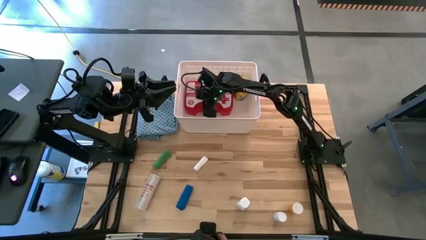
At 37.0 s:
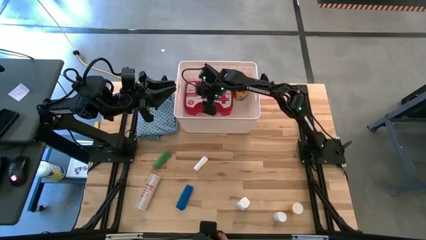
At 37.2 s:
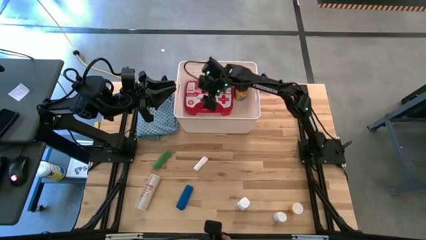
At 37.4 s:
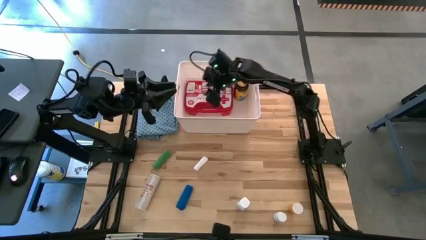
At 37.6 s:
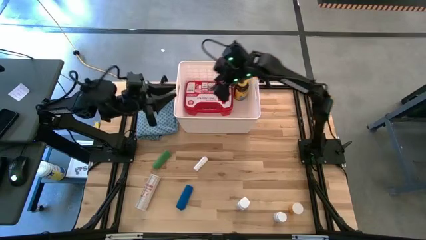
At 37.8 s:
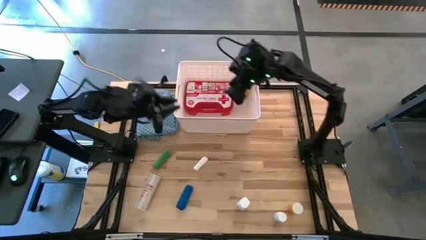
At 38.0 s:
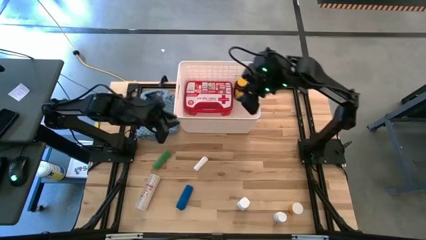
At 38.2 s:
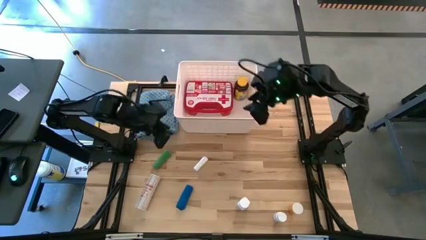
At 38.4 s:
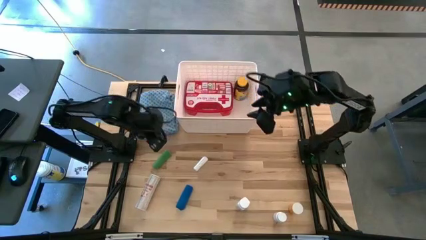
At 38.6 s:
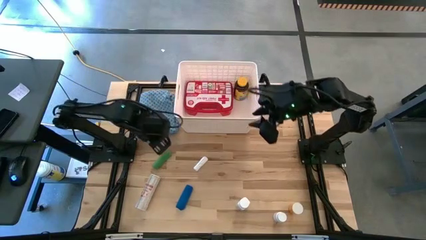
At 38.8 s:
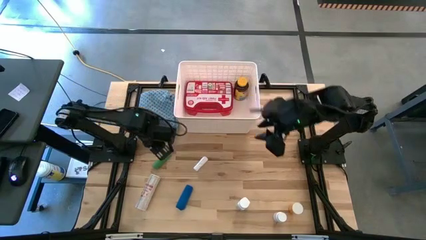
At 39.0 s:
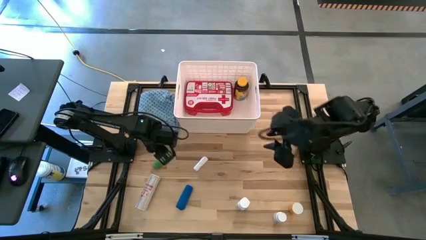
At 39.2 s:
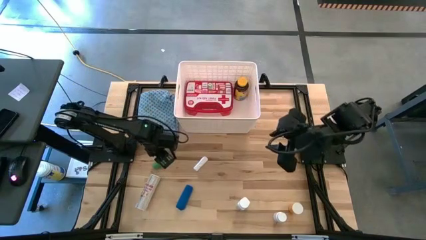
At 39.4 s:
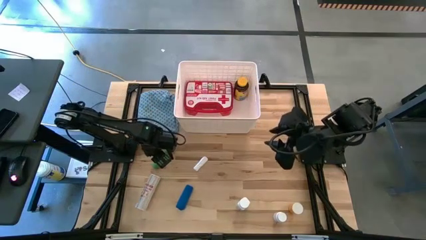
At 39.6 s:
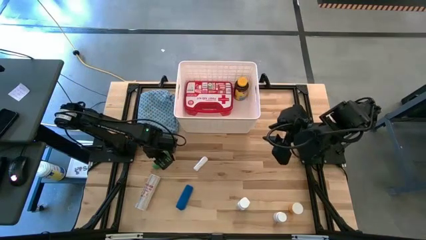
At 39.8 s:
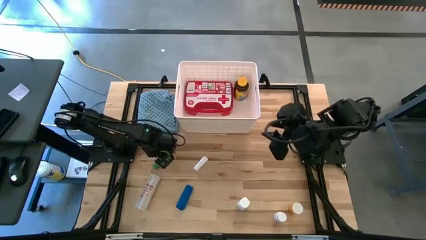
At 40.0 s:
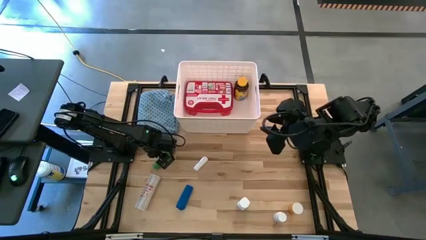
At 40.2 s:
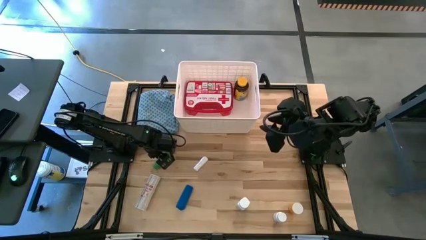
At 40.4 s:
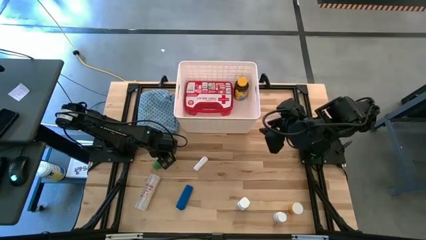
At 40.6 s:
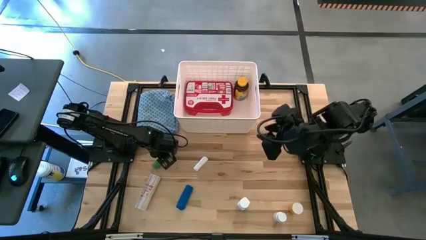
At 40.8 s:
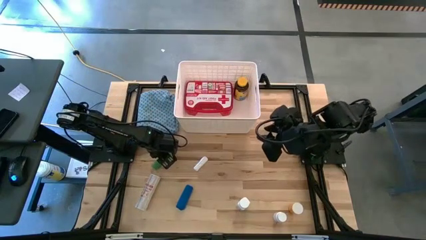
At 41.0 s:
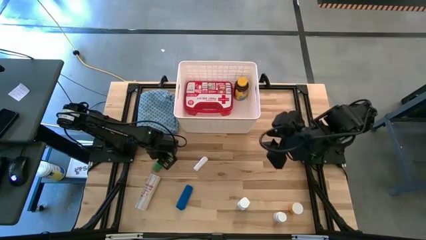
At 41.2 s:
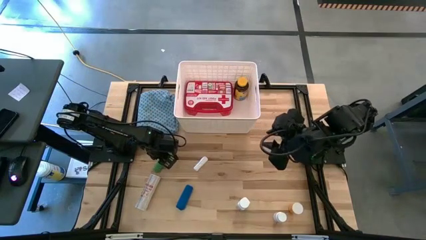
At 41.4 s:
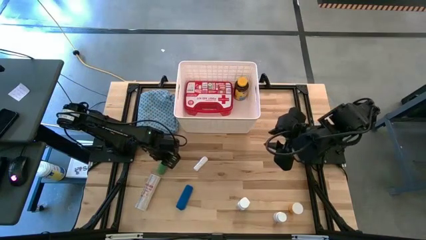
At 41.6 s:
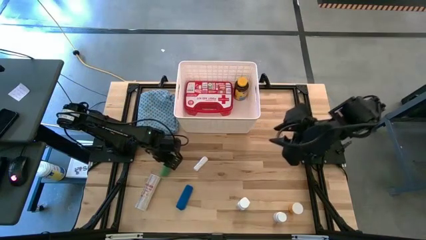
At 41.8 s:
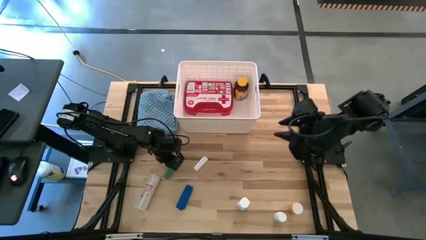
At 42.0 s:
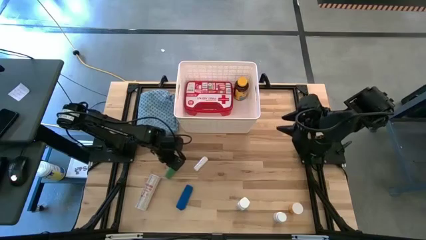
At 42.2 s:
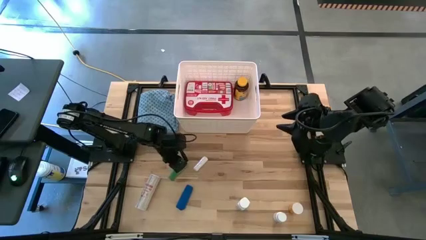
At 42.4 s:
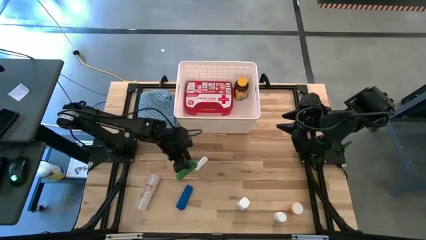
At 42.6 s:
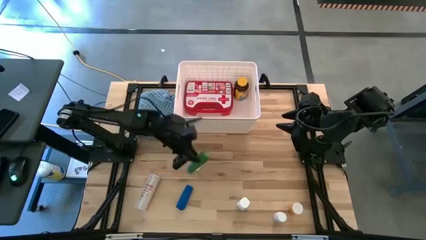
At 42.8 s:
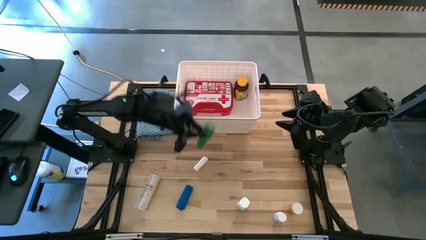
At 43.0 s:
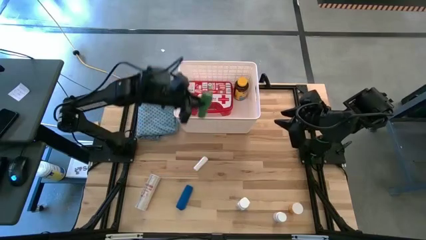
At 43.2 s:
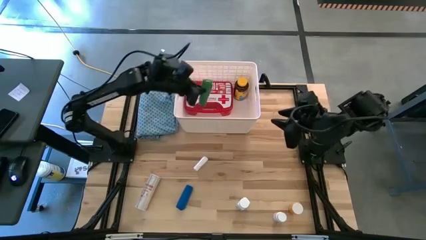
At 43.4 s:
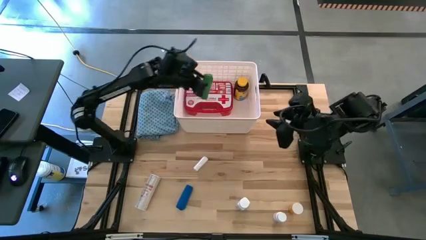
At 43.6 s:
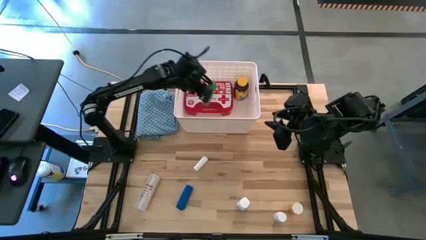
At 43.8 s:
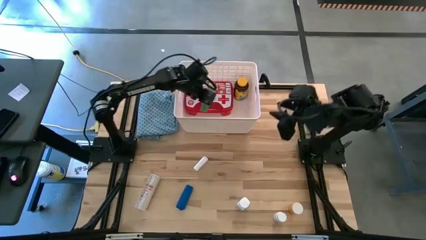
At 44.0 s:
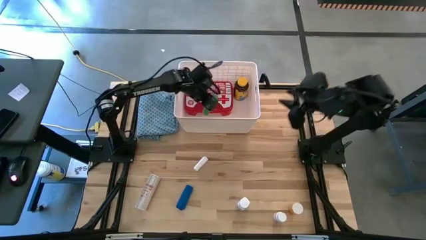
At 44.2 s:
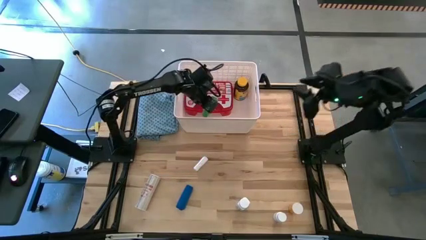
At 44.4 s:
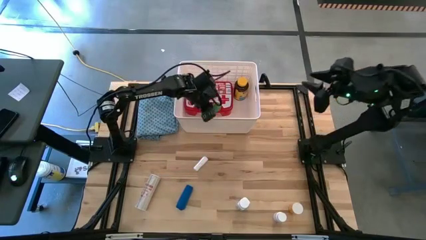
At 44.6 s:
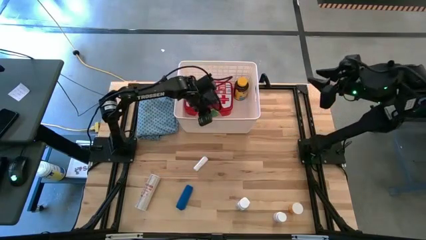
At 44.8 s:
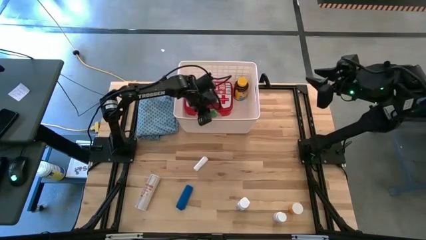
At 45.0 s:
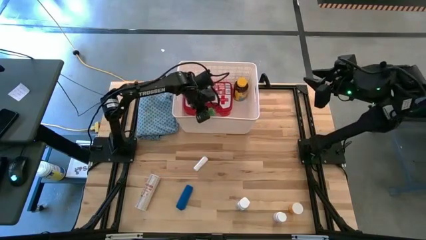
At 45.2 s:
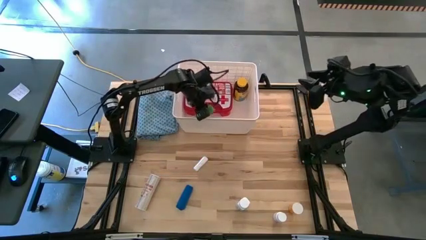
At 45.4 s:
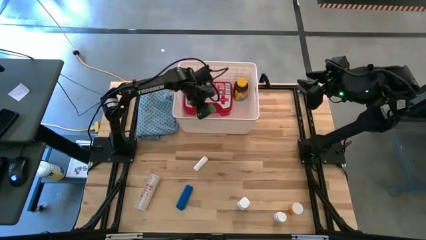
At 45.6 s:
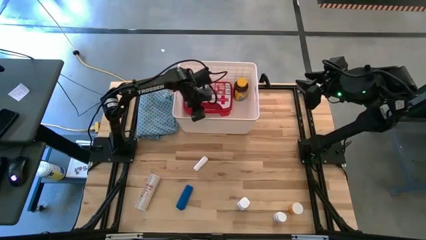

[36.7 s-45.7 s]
Task: Pick & place medical supplies in basket/bin
Put the green bandage into the white bin

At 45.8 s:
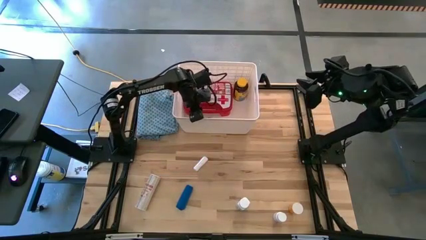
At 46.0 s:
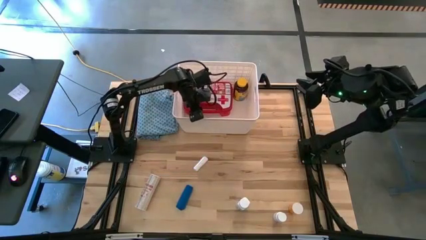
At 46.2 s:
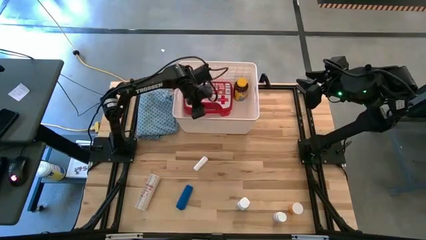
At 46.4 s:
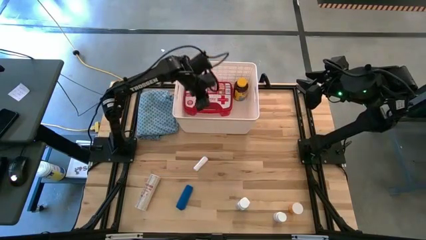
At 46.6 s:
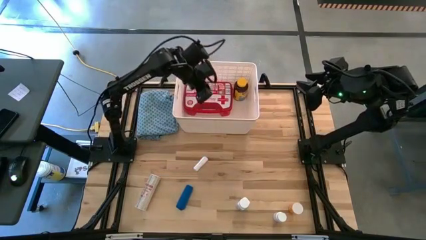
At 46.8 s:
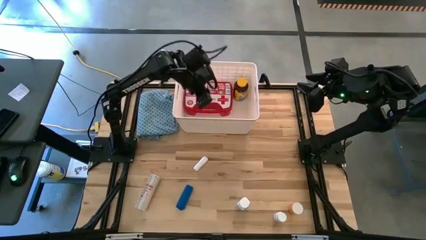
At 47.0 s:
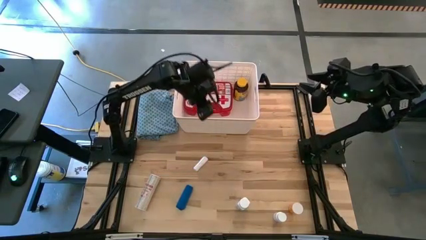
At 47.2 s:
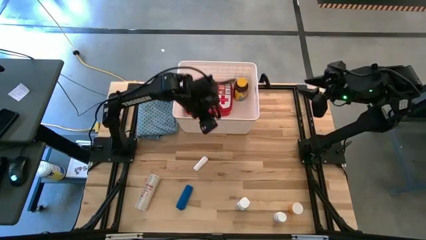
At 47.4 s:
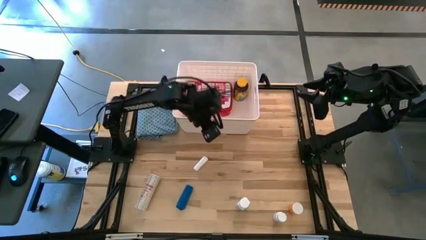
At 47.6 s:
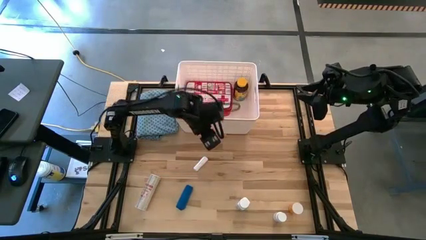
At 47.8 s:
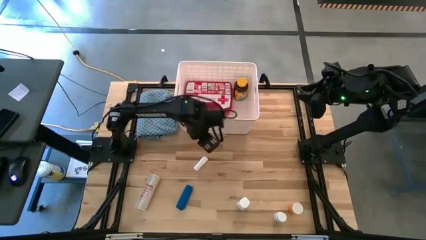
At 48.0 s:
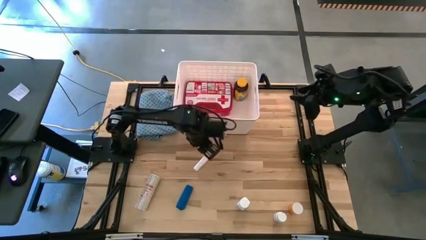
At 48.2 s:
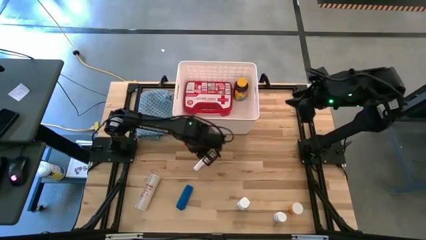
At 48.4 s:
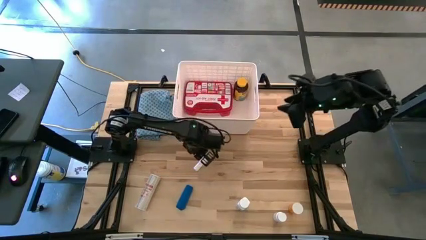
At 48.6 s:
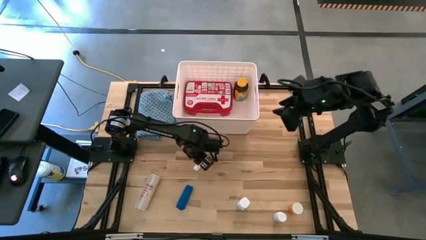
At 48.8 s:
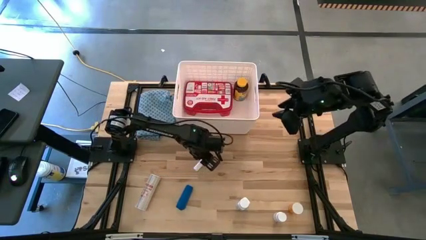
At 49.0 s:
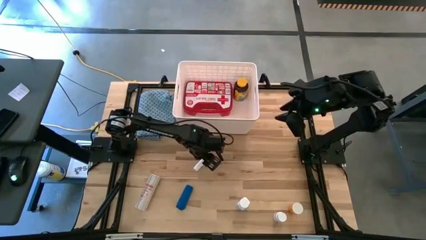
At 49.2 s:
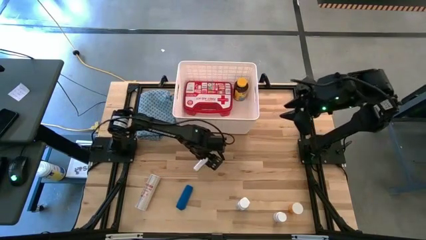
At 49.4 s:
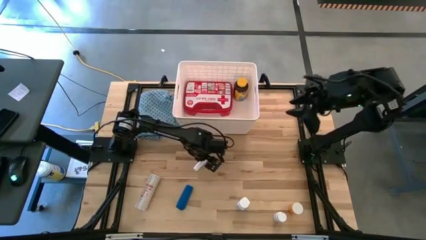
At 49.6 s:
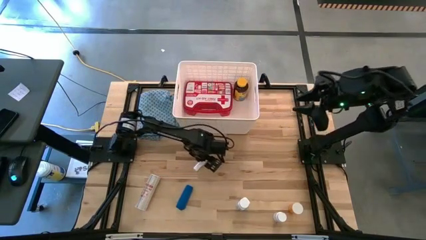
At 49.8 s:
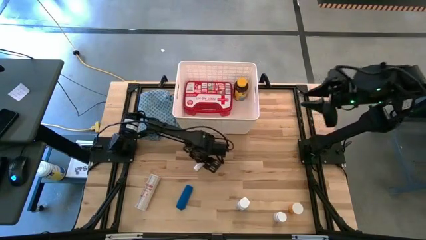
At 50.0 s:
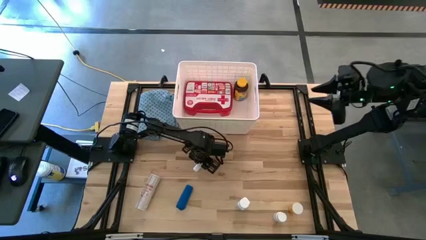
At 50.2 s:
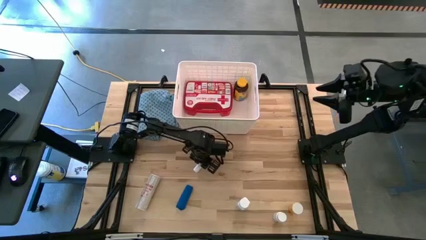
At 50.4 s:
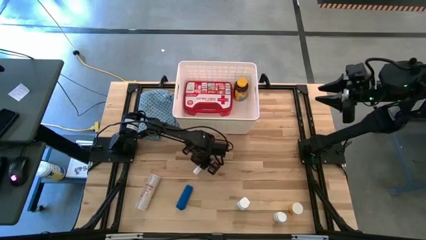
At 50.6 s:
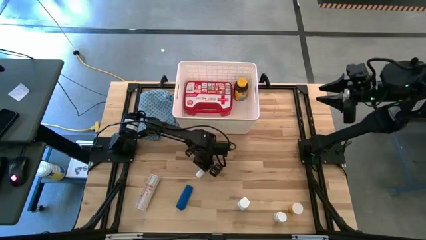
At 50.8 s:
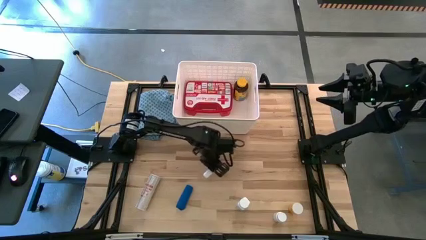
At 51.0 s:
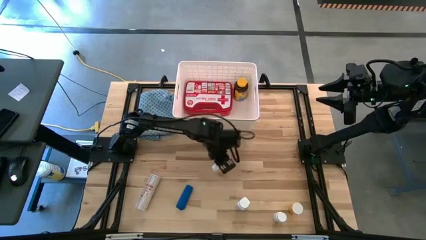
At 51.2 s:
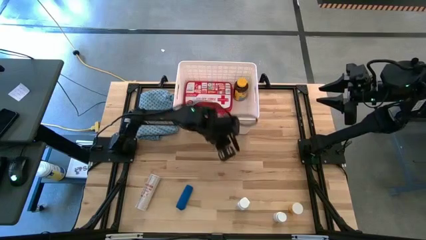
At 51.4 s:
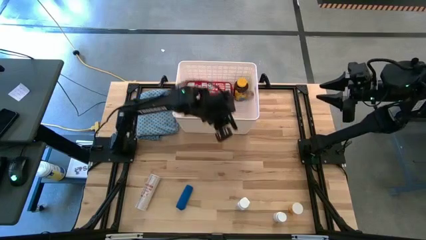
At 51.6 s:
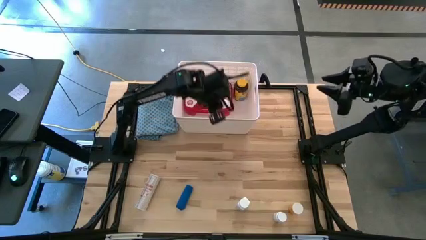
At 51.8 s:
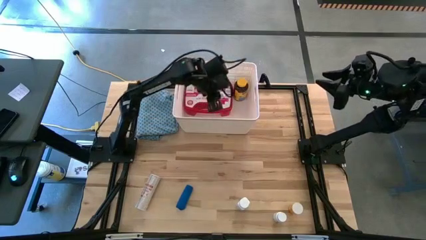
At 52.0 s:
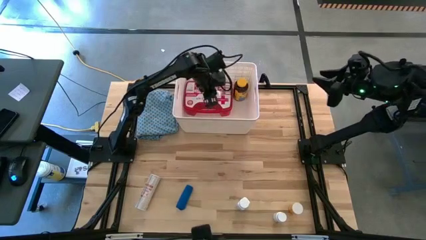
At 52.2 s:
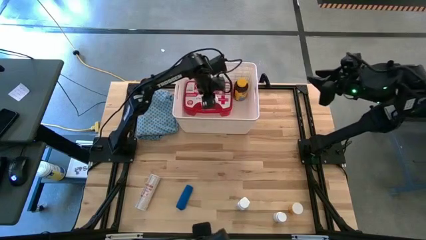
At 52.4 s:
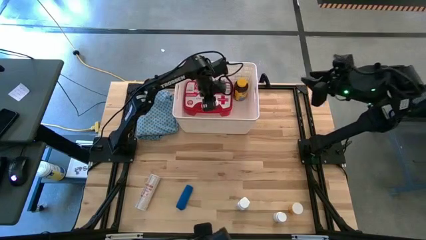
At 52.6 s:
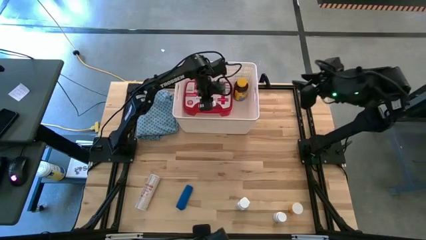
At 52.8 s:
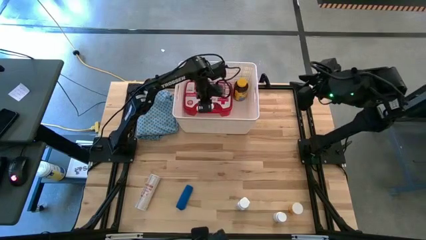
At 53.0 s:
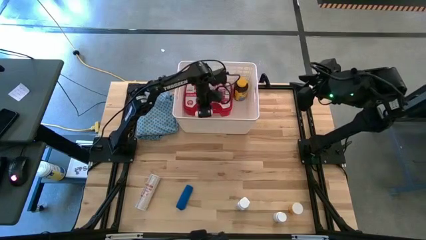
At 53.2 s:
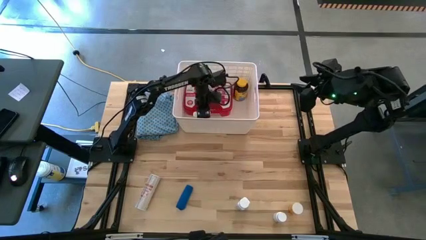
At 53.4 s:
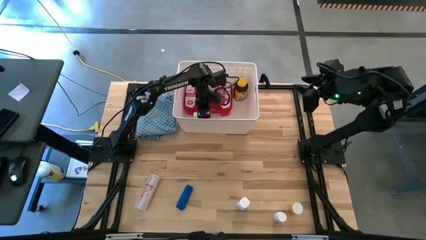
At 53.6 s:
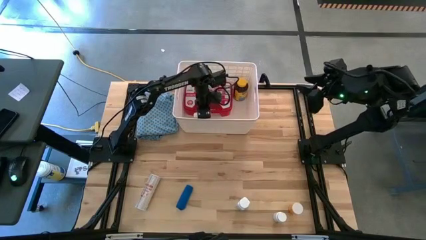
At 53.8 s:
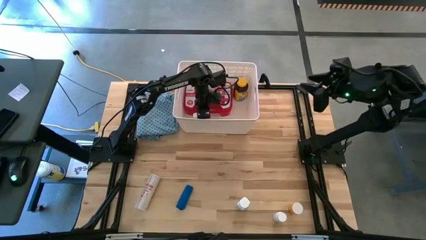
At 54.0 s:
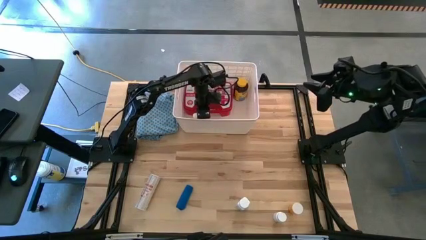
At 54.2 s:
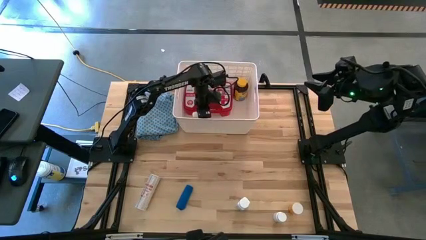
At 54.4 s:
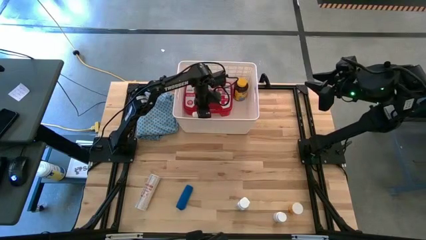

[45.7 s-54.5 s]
Put the white rolled gauze into the white bin
